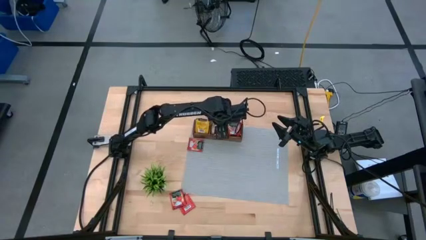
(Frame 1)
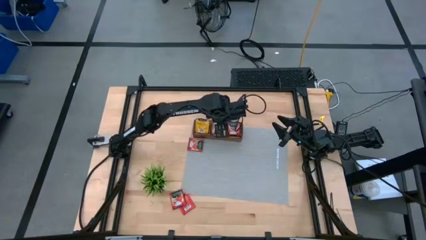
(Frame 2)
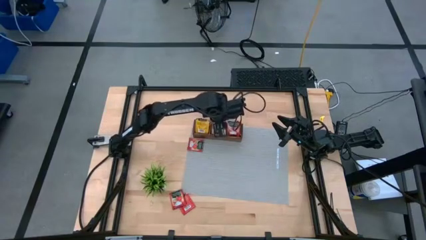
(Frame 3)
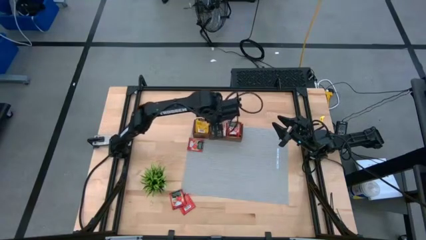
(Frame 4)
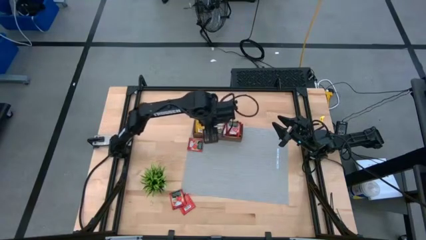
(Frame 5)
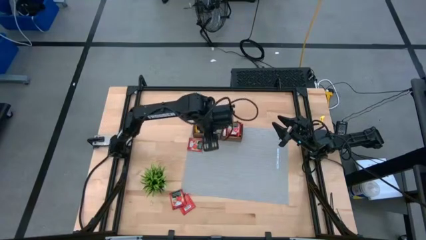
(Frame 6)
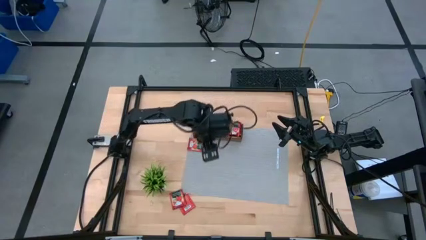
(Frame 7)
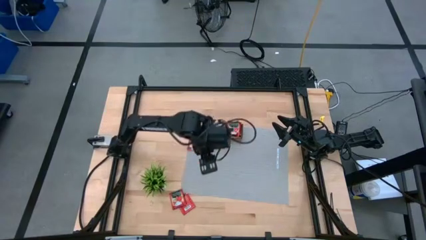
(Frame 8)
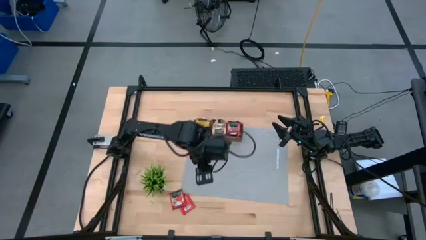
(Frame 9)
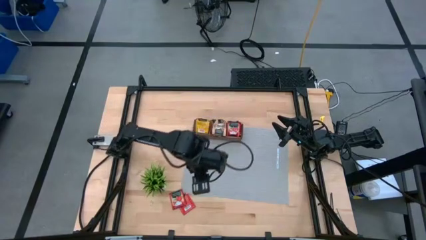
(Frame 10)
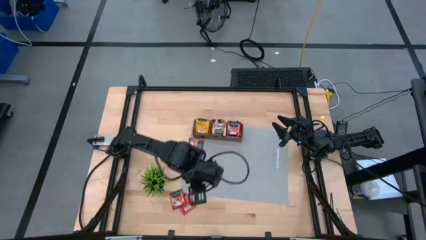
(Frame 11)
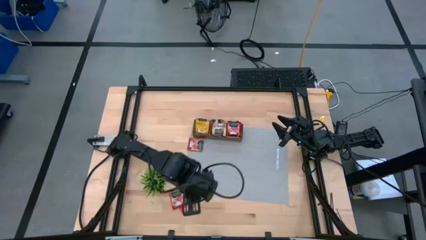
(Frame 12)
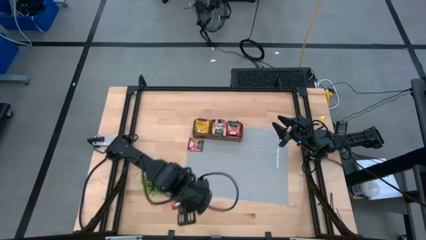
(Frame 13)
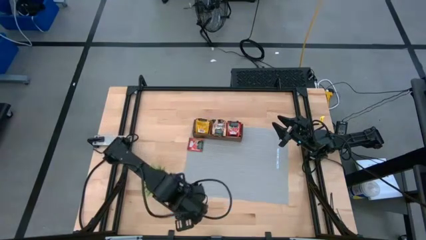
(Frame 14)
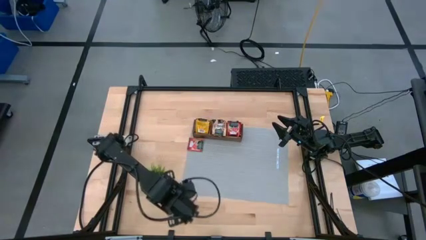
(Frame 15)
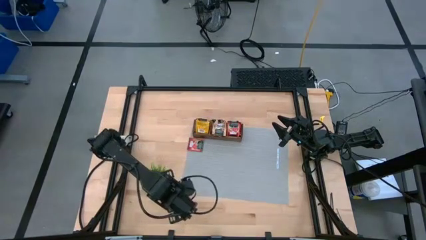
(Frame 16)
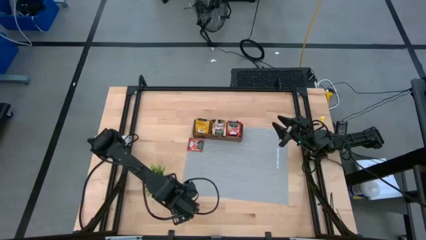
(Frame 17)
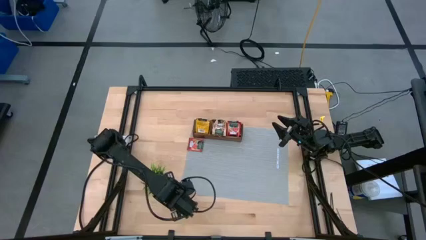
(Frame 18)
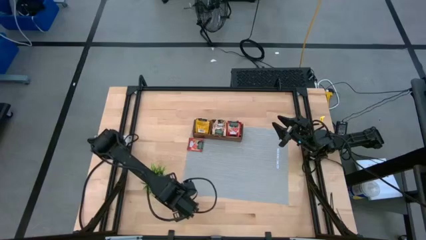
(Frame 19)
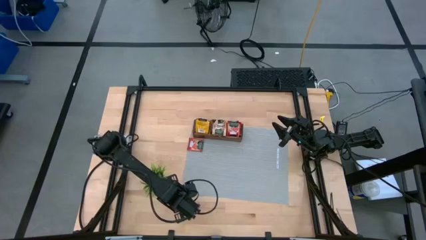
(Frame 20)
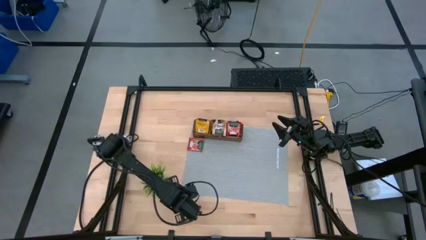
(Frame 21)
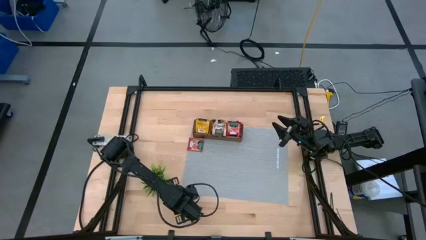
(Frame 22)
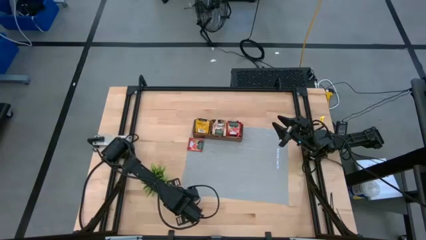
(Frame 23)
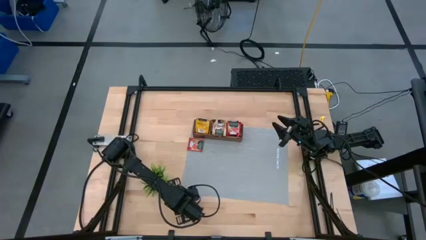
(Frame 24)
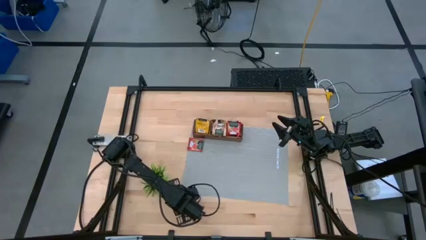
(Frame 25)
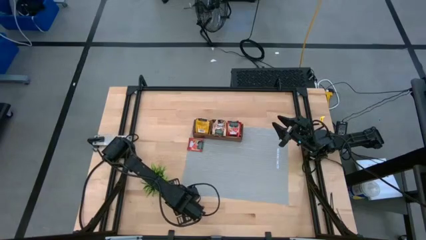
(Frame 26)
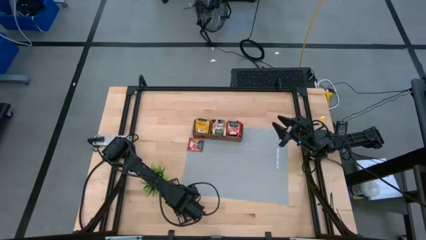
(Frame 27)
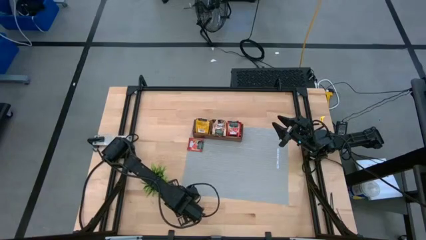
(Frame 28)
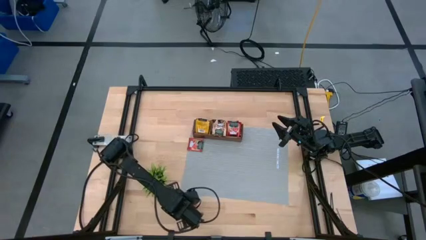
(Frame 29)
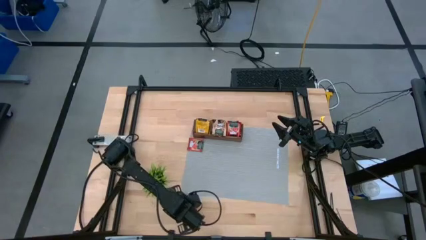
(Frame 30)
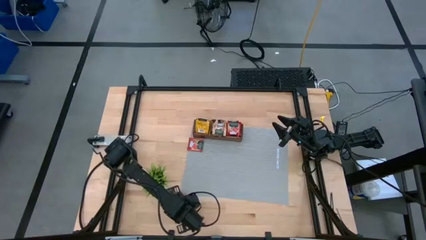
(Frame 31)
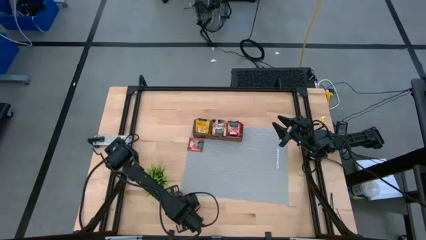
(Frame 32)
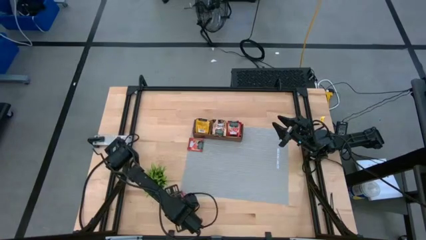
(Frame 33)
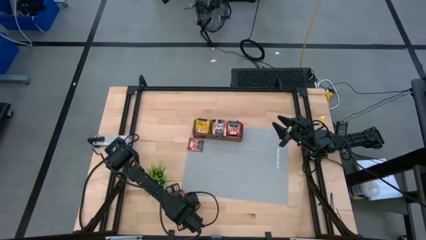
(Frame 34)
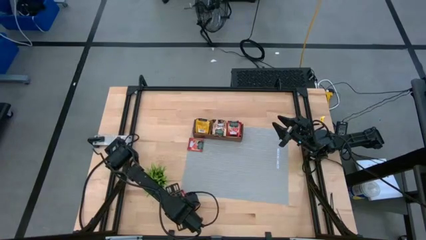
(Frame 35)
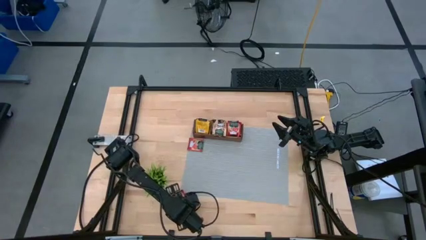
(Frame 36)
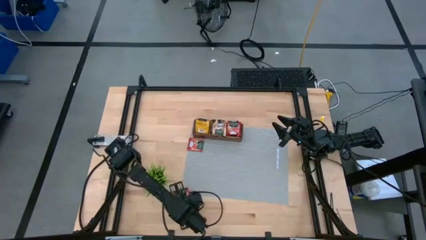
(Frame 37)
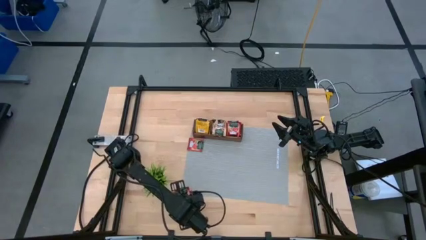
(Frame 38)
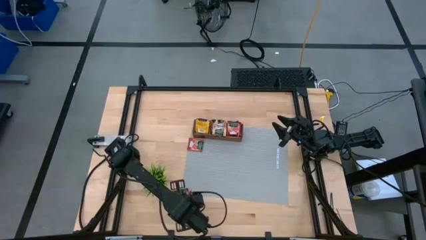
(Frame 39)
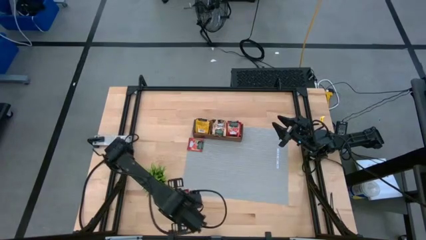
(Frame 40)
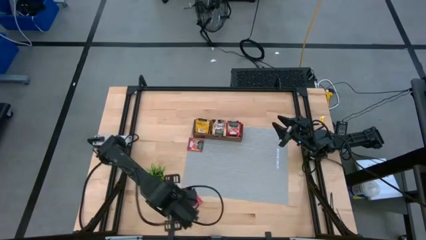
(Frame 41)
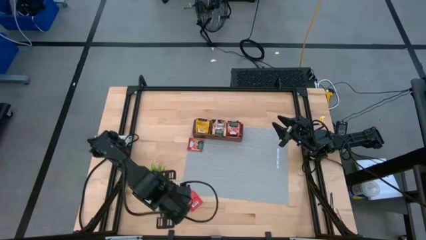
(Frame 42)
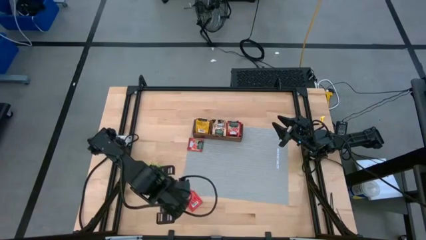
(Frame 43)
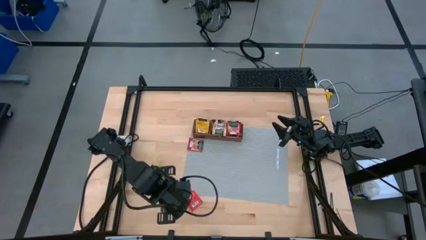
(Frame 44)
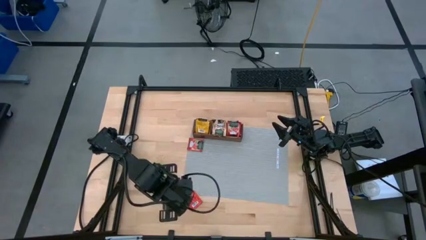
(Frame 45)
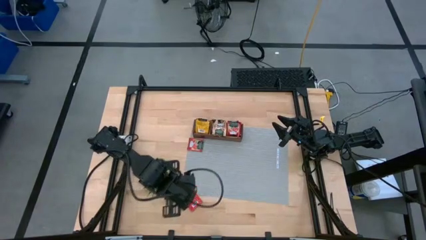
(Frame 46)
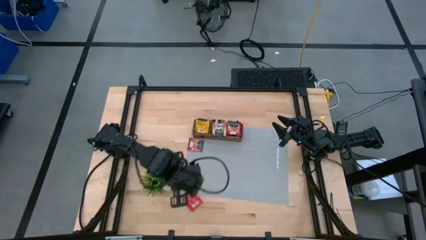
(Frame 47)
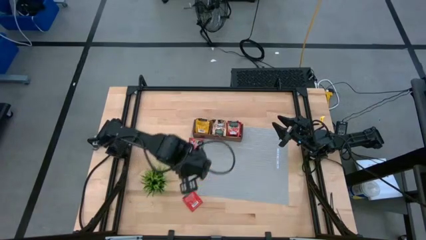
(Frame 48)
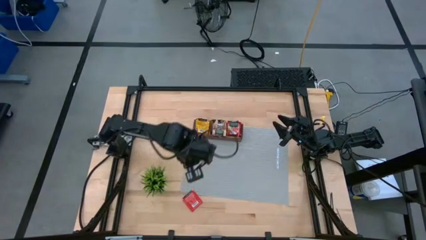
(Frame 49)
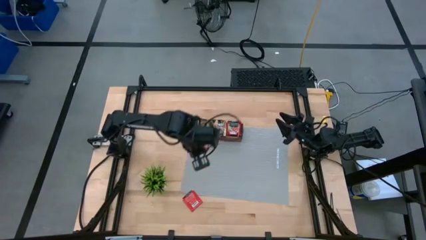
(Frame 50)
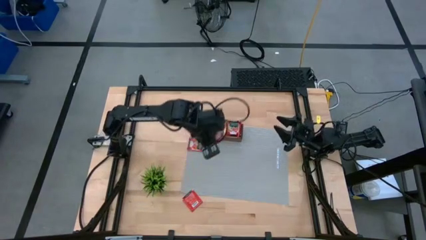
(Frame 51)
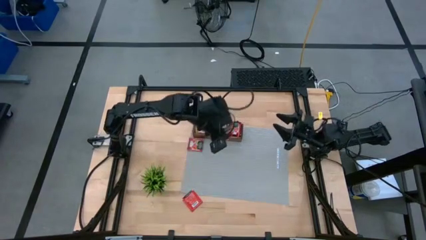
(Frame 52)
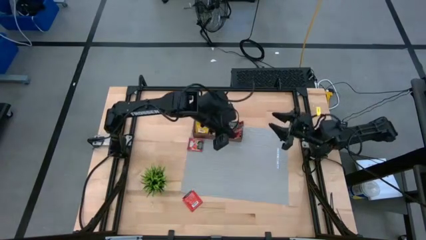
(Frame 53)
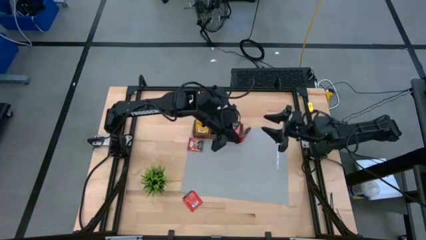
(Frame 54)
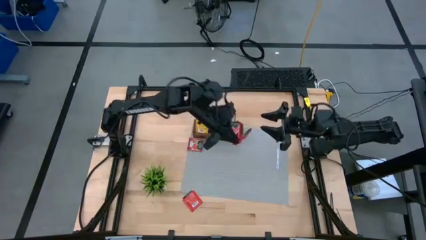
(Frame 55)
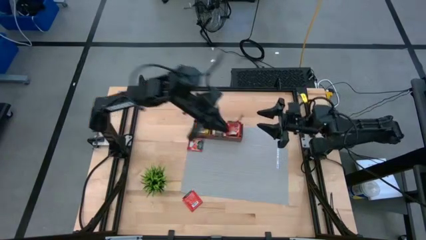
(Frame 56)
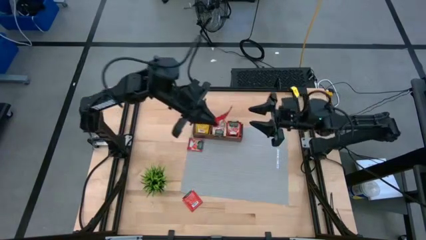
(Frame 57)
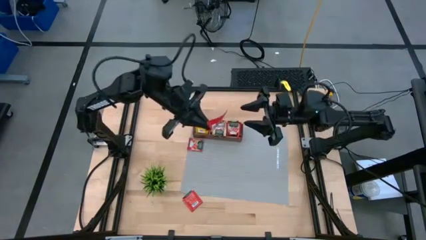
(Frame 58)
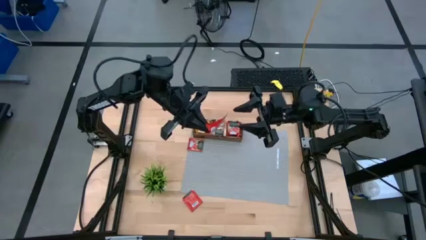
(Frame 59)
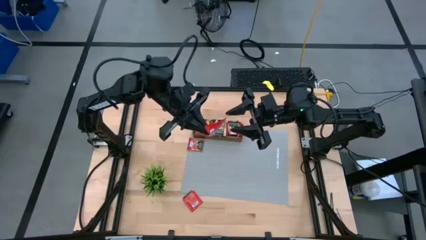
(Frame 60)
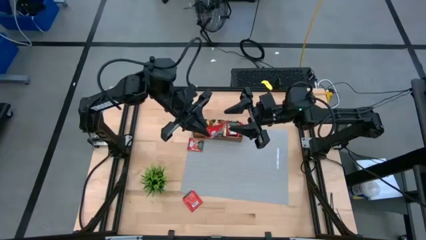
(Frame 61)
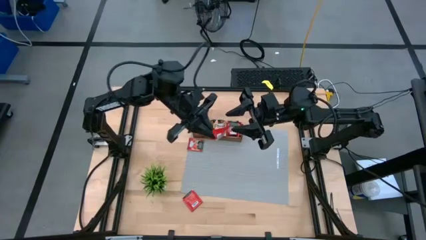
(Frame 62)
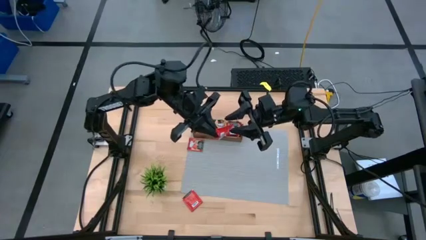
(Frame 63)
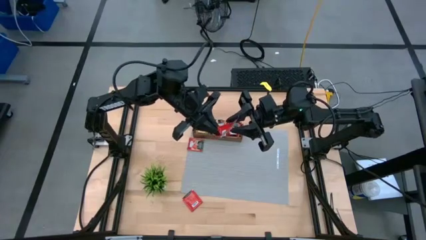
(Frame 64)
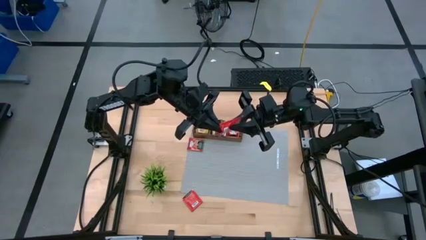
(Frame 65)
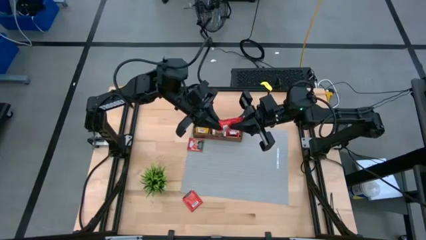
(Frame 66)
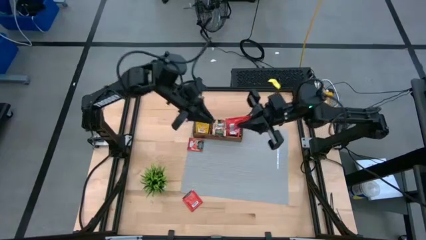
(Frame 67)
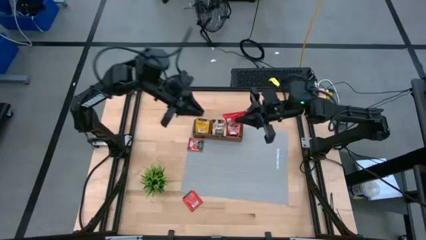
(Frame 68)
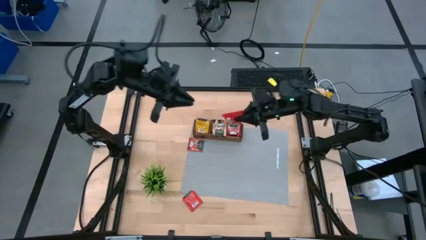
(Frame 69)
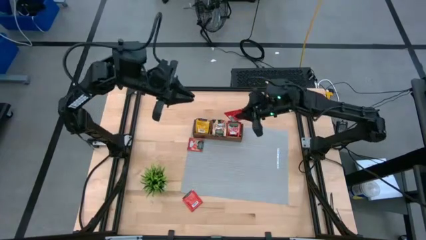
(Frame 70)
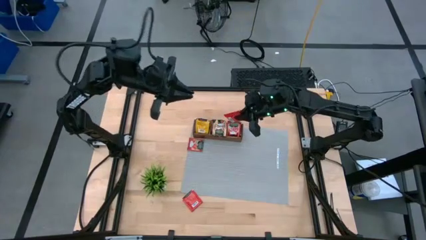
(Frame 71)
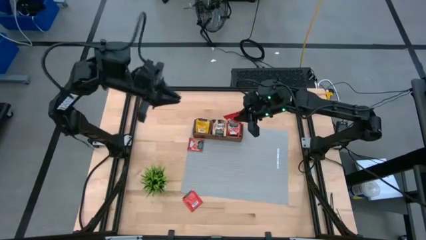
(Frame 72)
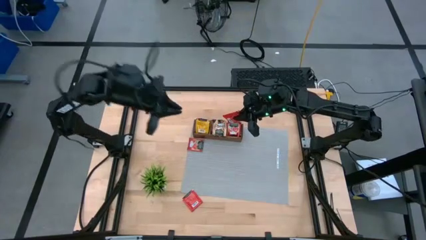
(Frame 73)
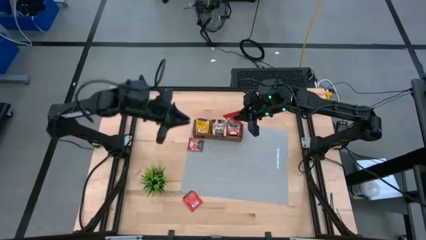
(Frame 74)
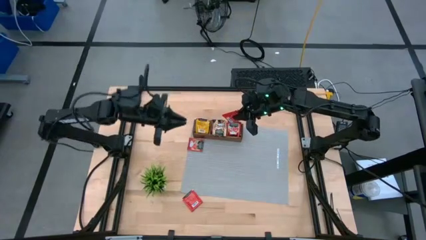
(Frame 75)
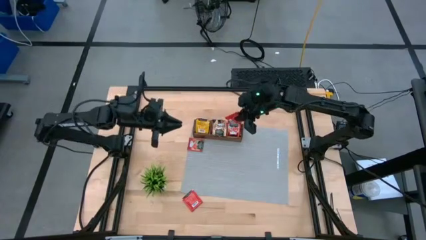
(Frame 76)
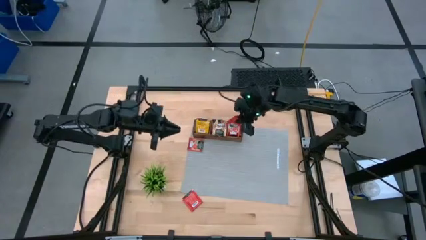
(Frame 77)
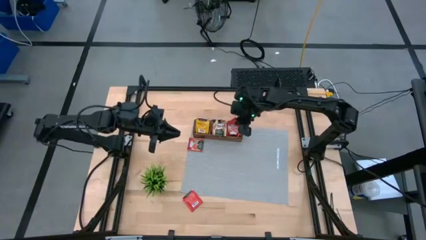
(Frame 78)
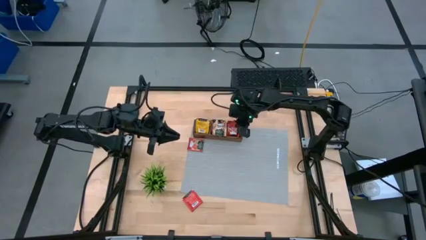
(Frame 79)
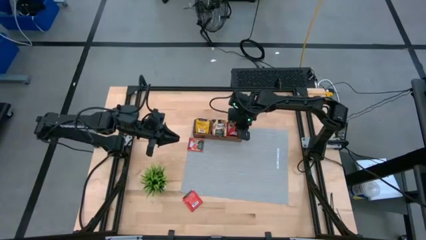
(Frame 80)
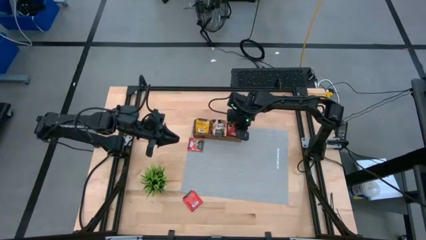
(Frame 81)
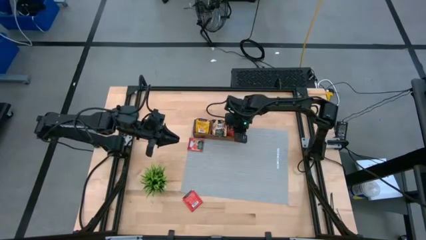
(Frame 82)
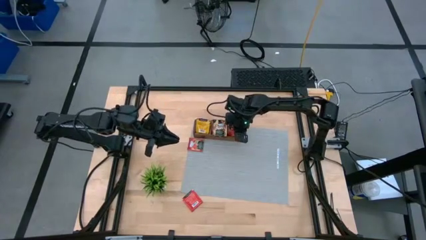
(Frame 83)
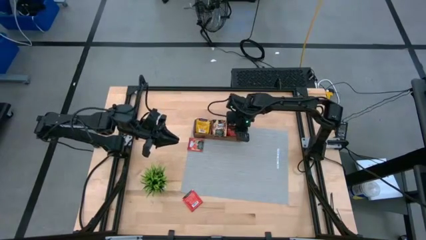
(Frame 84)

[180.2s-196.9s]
Task: Pick & Place Tea
Put the red tea bag into the right section of the wooden organizer
